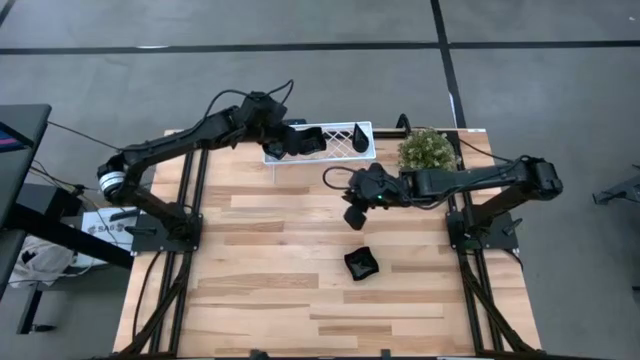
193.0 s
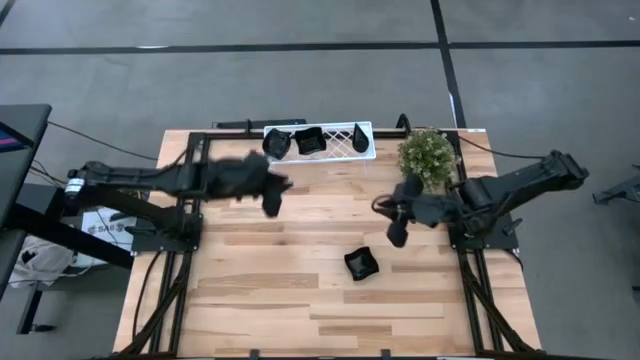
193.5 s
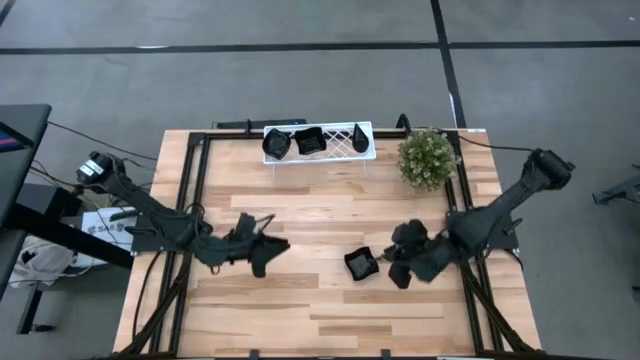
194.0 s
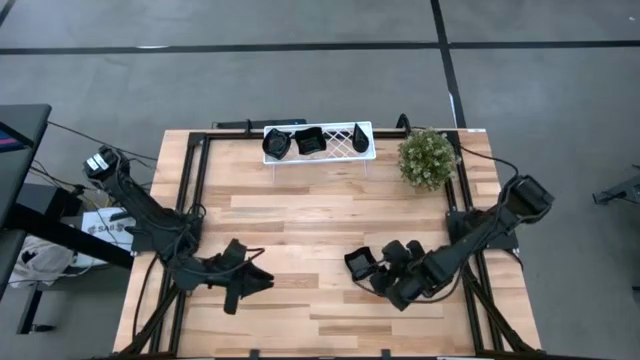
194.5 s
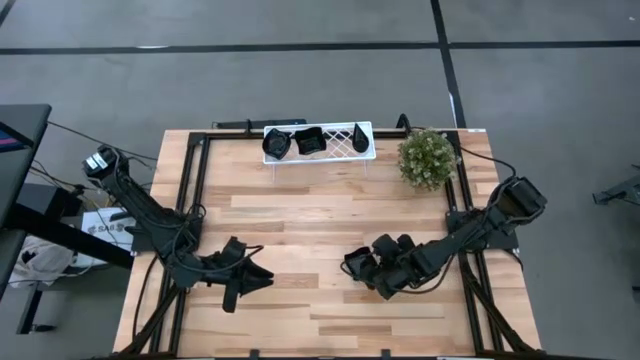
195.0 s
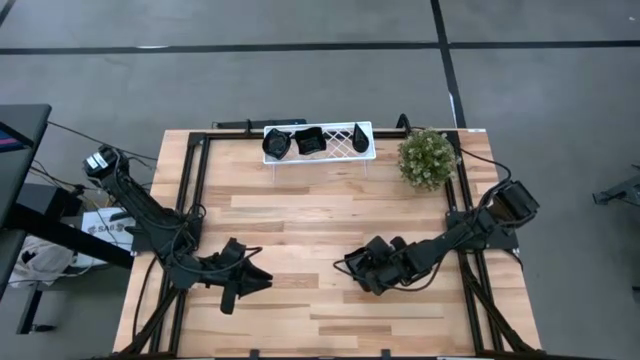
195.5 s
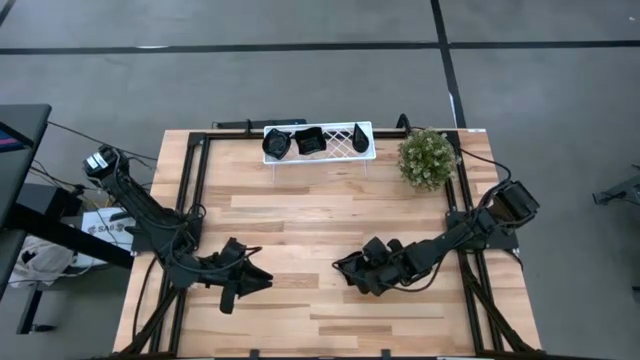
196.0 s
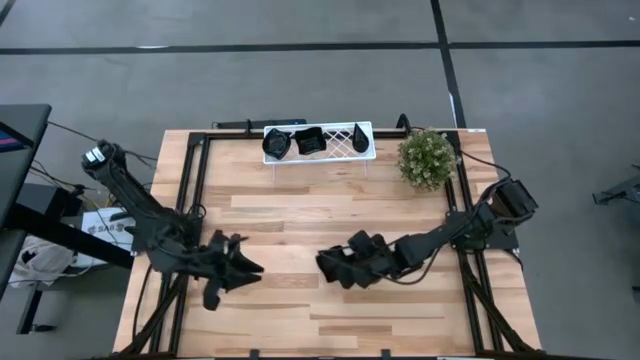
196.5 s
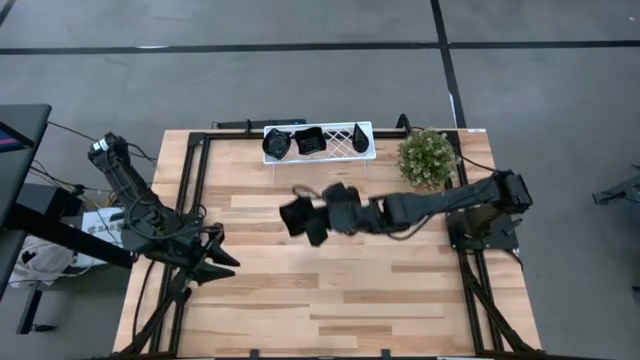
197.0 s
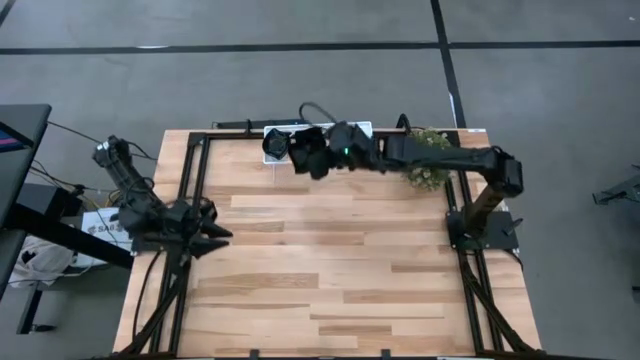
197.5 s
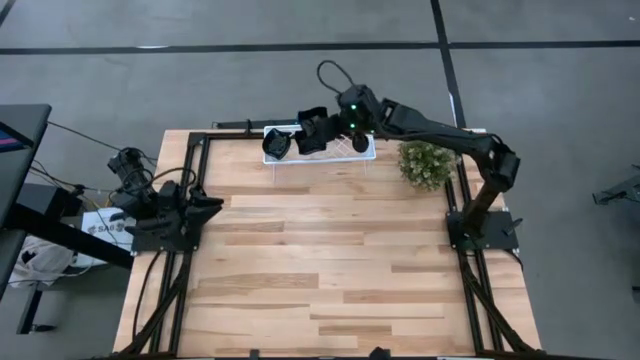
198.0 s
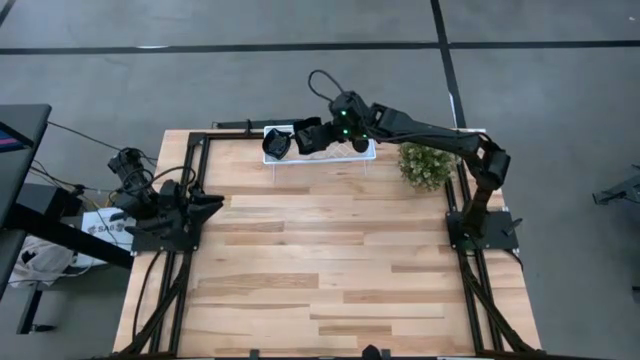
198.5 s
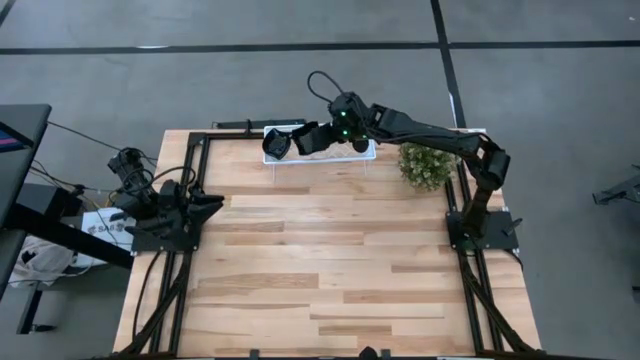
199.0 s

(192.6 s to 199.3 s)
Task: Pick & Place Mini shaped plates
Stack the black distorted square plate on top of the black distorted square plate on the shelf

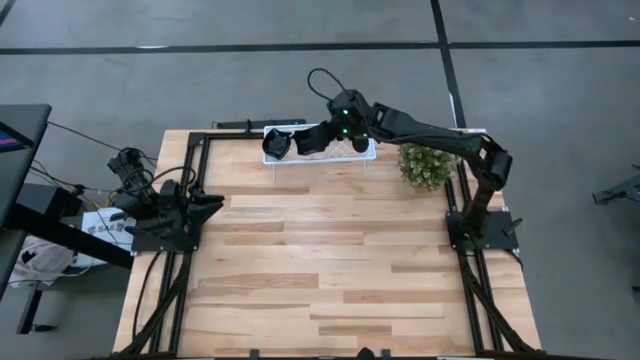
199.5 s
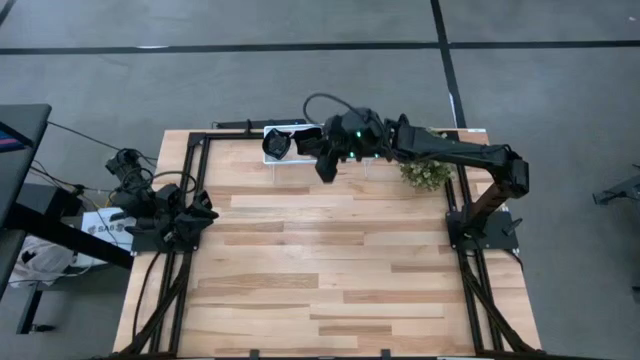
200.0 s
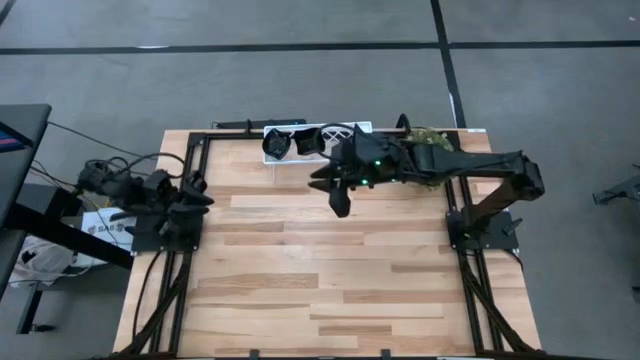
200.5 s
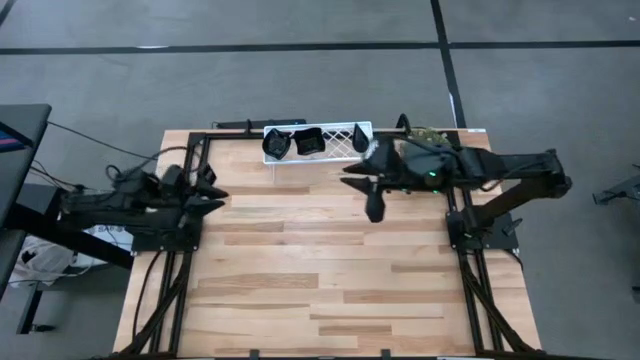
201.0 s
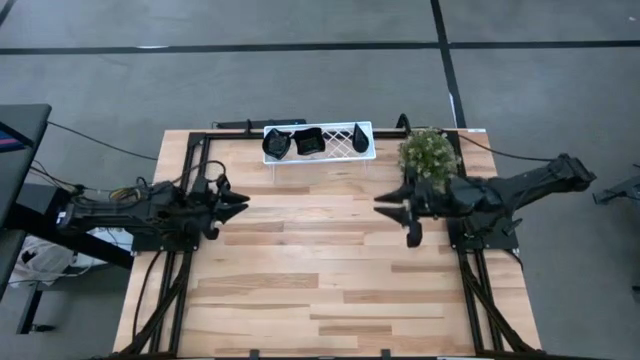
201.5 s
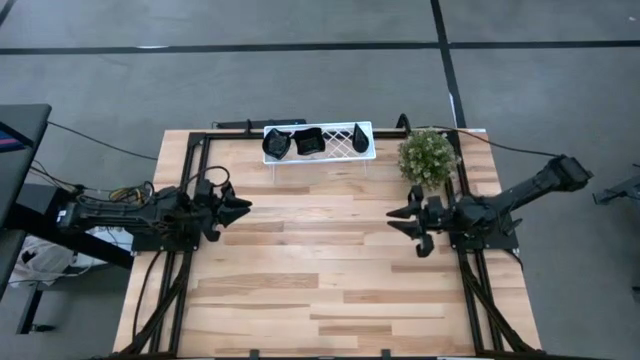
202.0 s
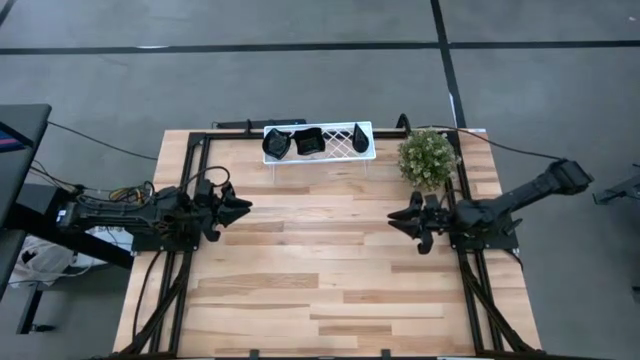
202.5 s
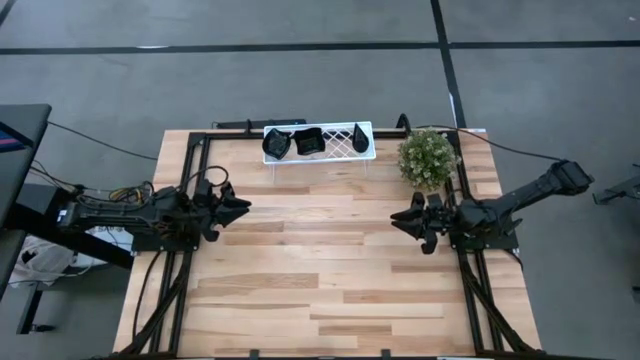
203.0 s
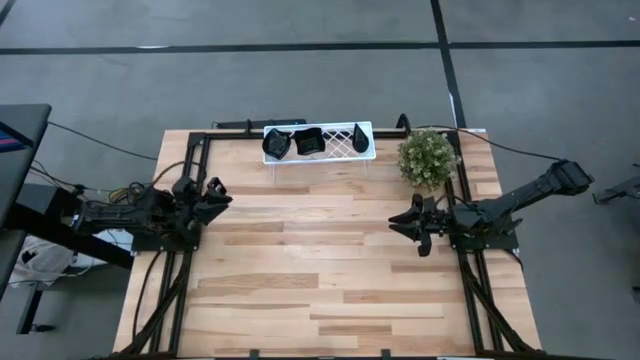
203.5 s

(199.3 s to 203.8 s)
Return to Home Position

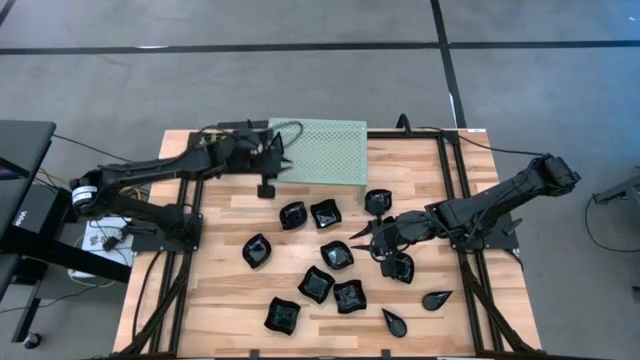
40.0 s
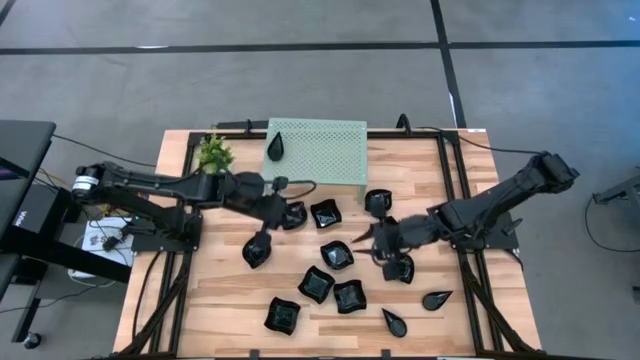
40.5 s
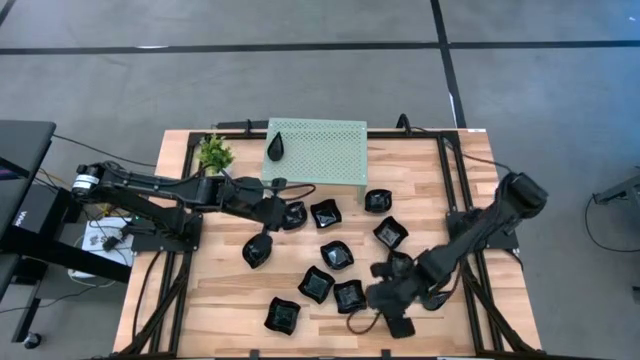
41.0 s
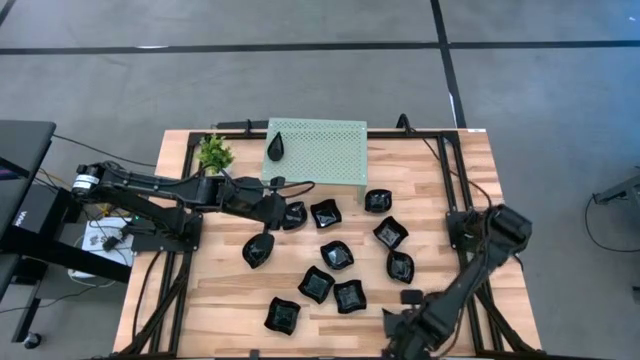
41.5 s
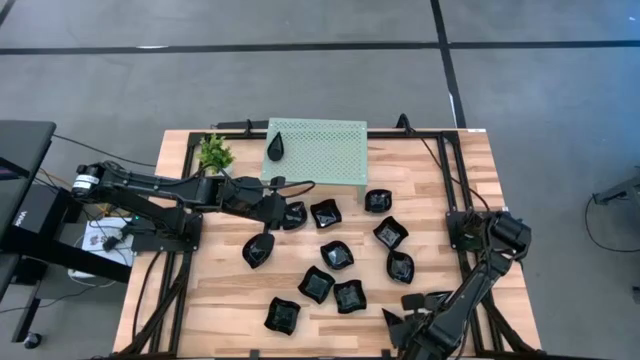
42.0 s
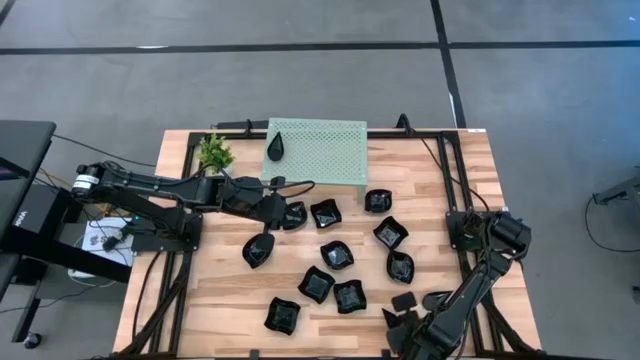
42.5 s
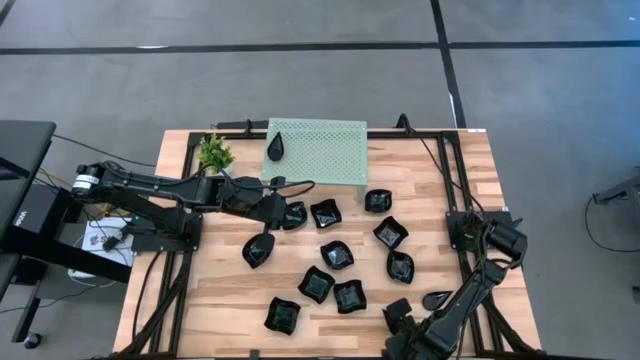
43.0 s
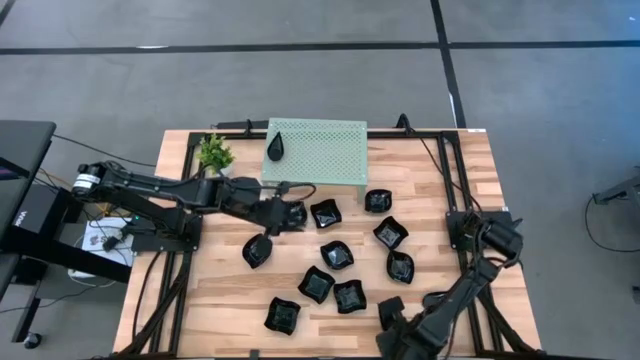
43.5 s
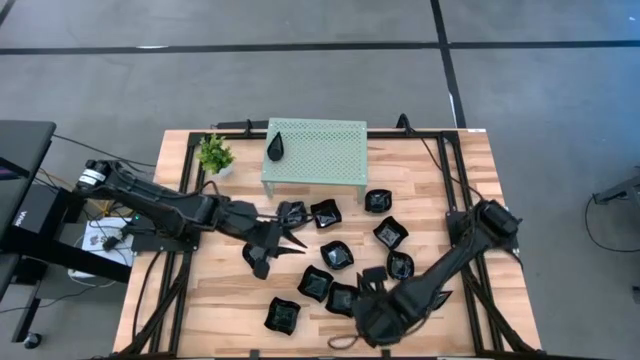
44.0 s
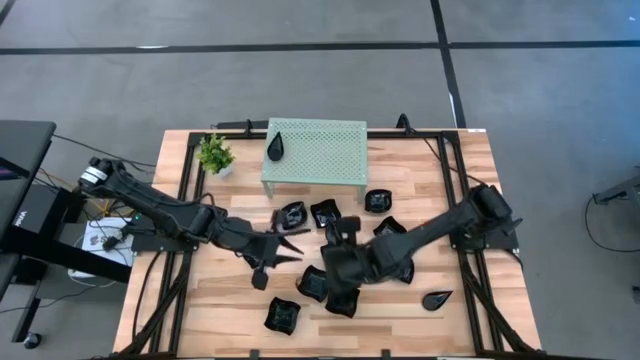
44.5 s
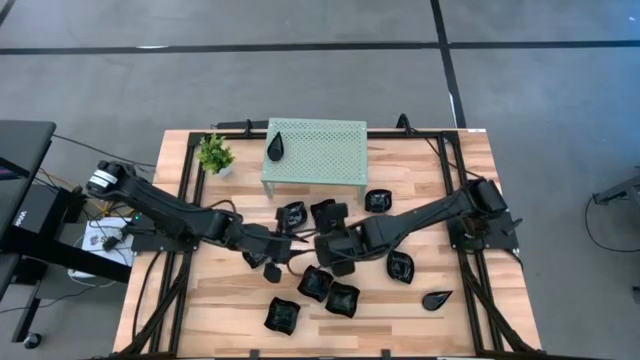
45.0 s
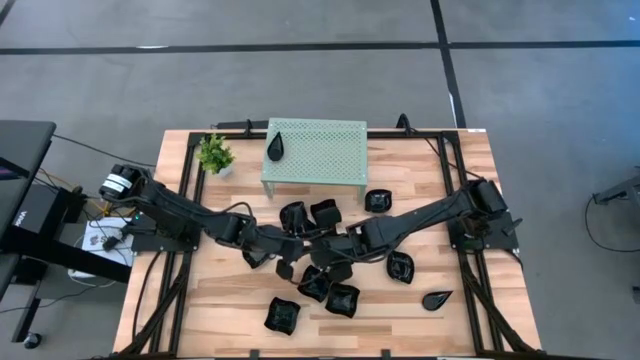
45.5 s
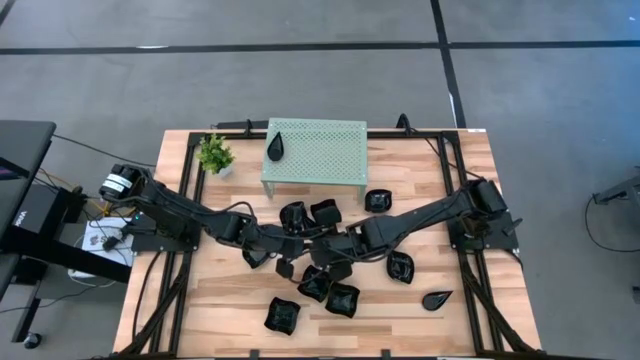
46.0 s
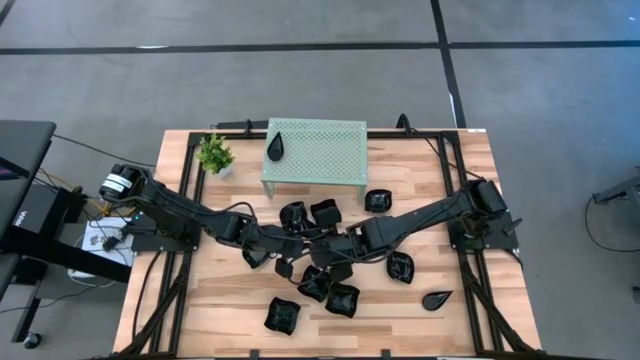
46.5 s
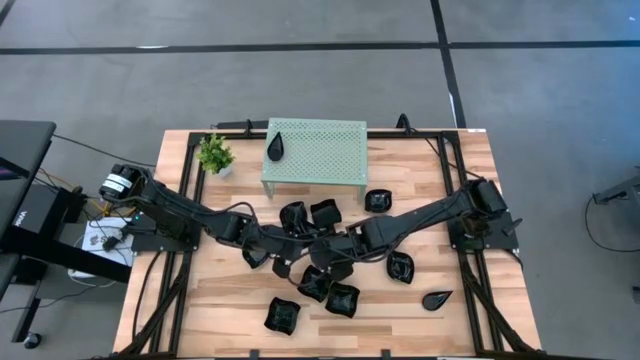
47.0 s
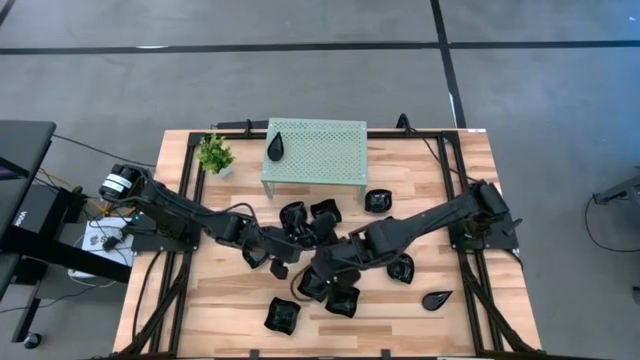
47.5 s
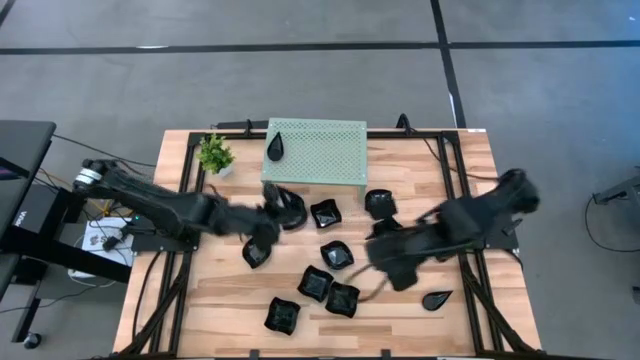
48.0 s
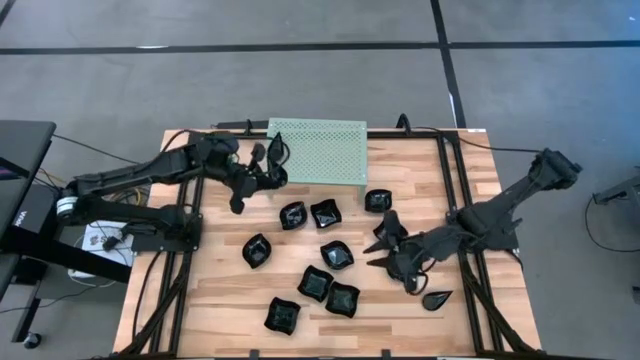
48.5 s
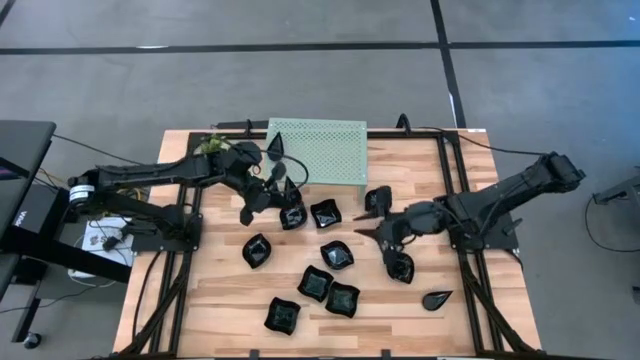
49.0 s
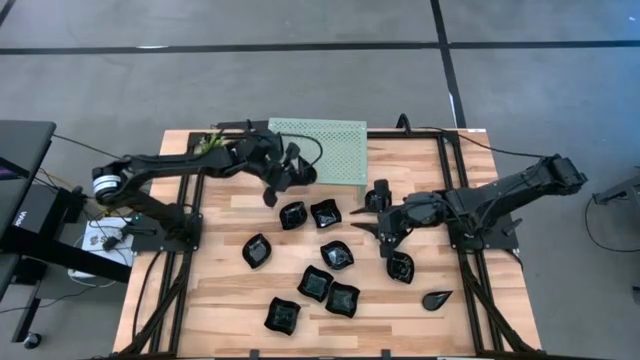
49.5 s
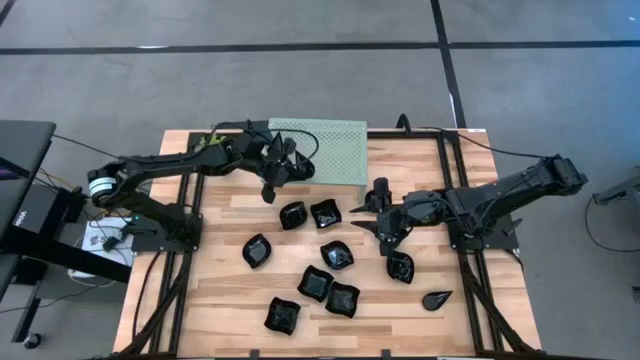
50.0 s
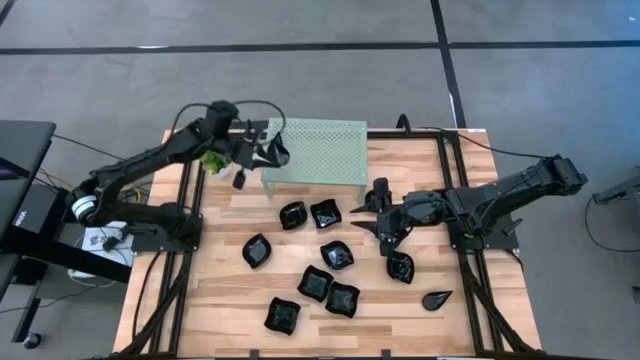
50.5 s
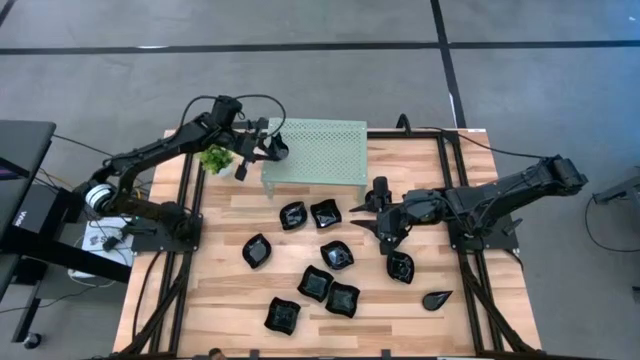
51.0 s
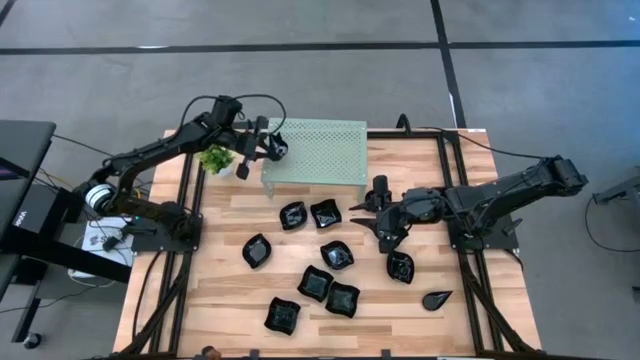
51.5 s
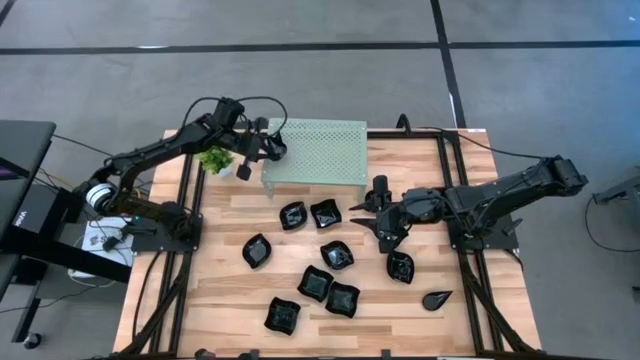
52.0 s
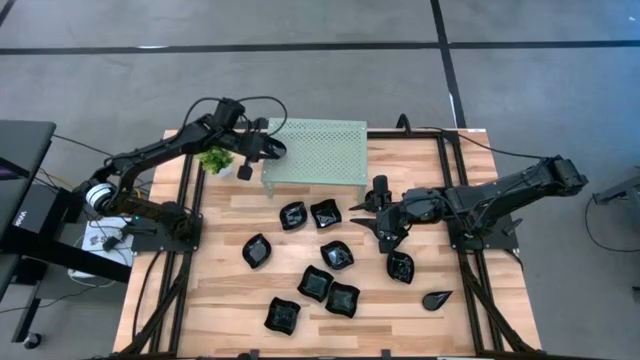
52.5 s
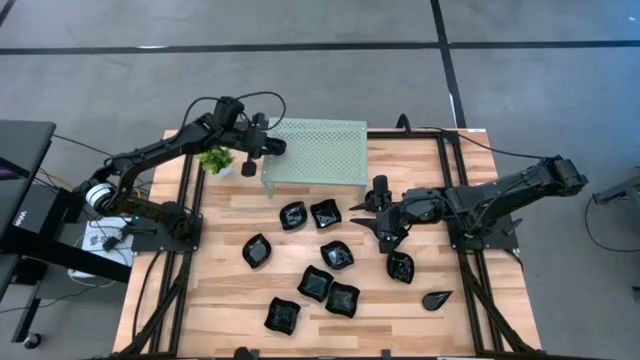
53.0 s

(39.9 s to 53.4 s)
Task: Pick & Place Mini shaped plates
Stack the drop shaped plate on top of the other drop shaped plate on the shelf
